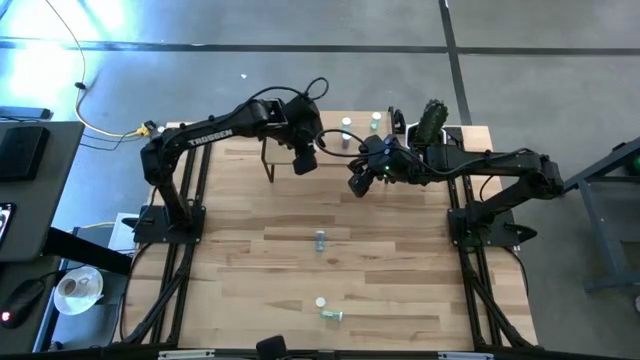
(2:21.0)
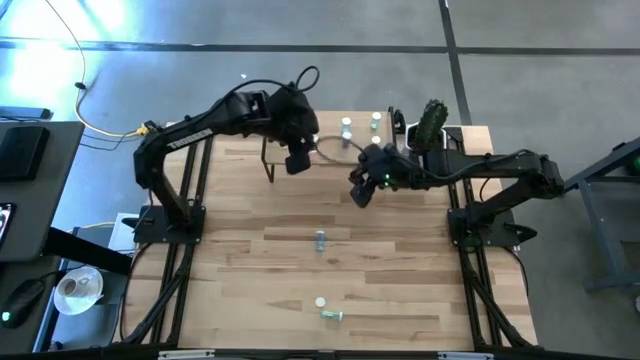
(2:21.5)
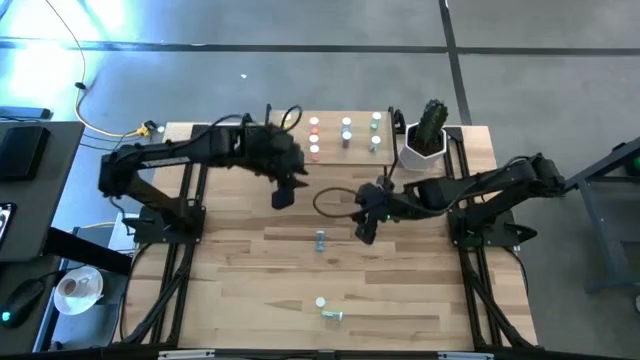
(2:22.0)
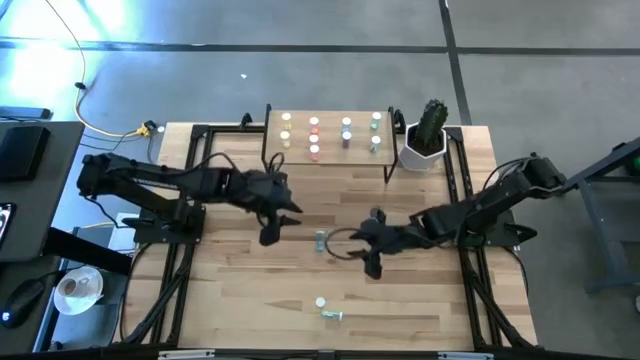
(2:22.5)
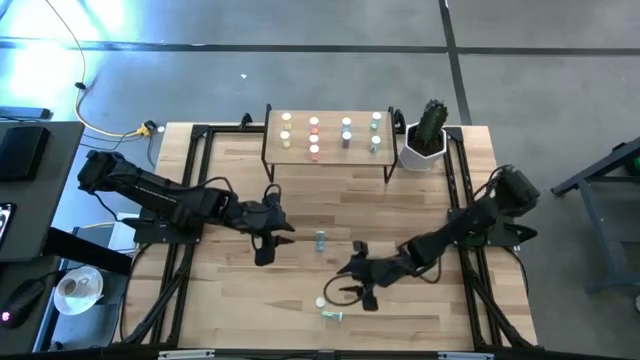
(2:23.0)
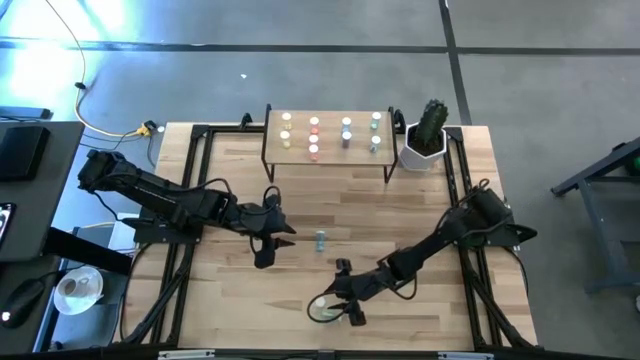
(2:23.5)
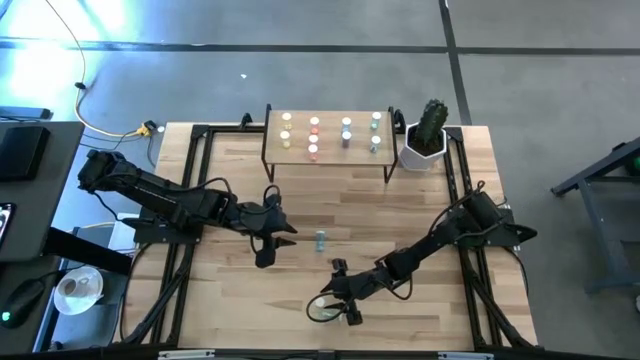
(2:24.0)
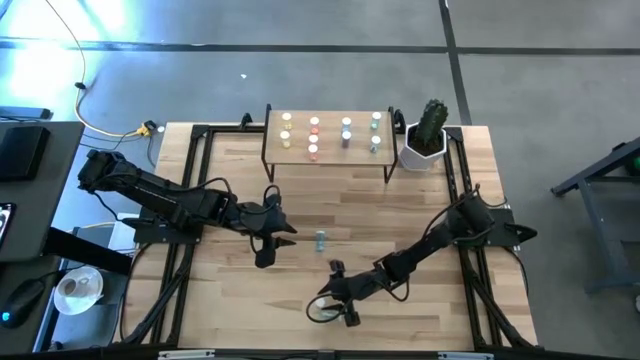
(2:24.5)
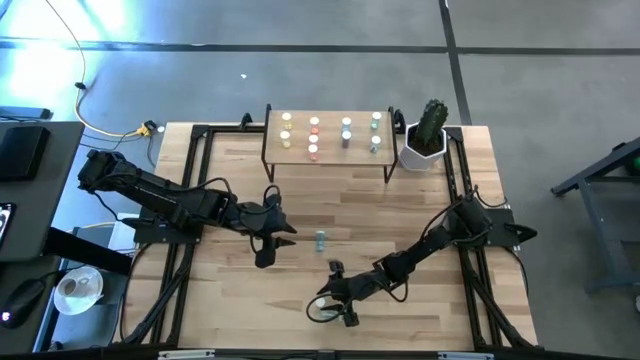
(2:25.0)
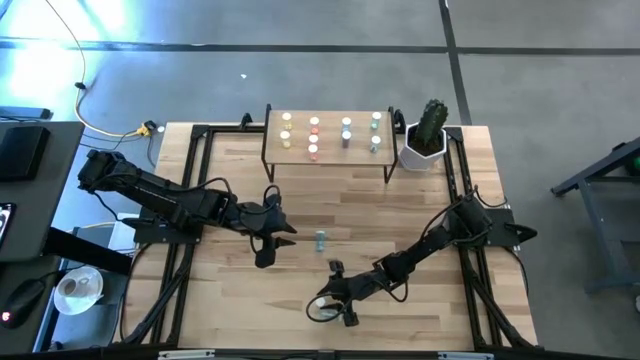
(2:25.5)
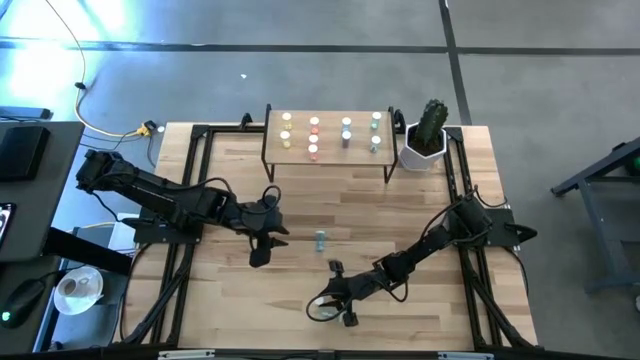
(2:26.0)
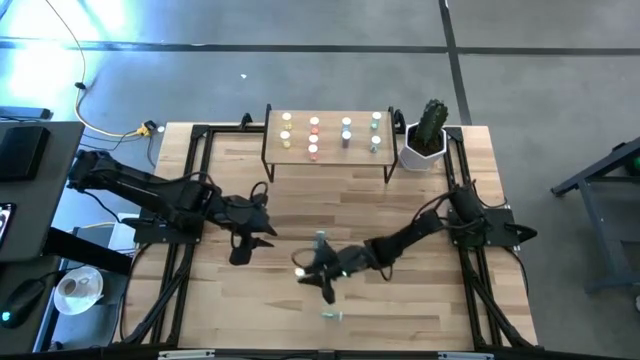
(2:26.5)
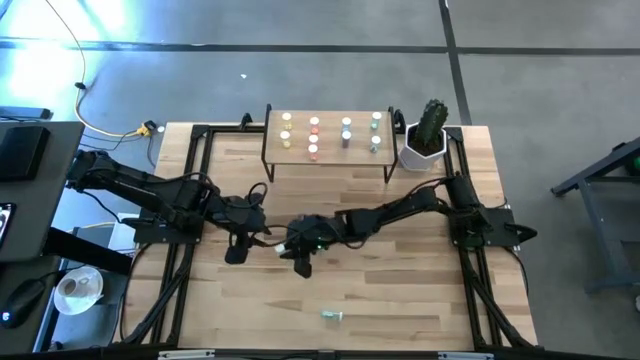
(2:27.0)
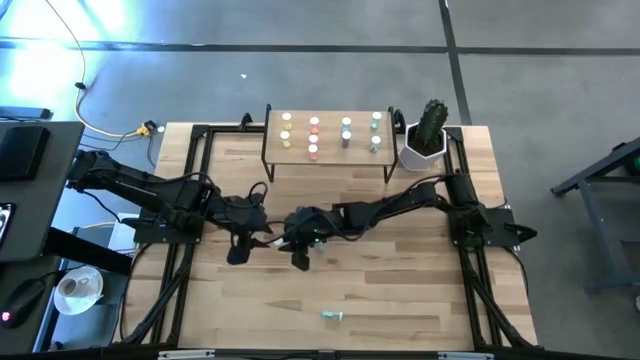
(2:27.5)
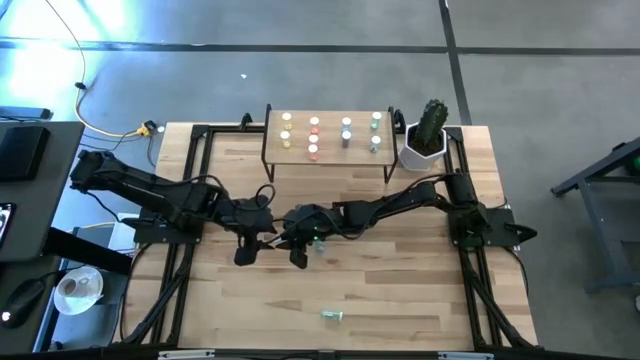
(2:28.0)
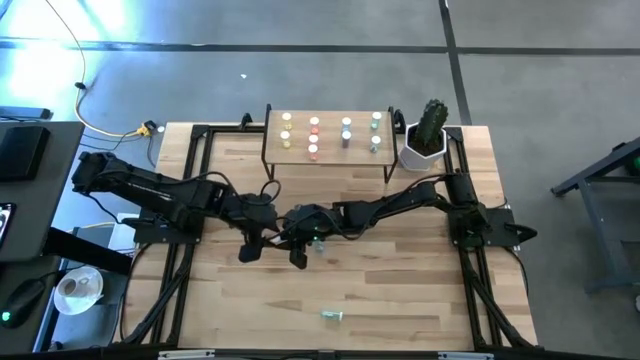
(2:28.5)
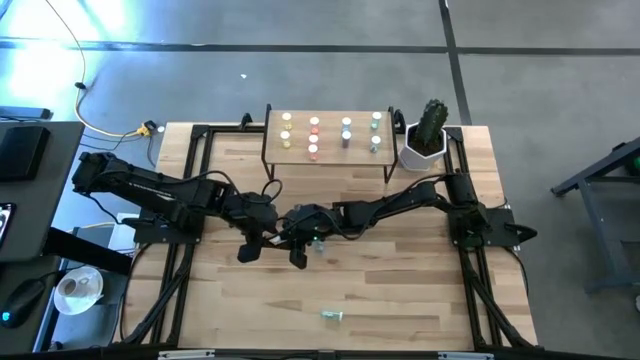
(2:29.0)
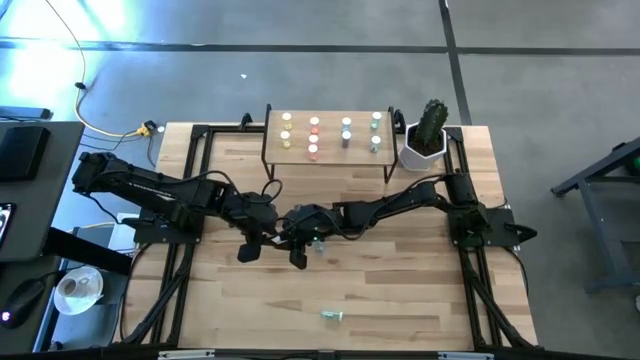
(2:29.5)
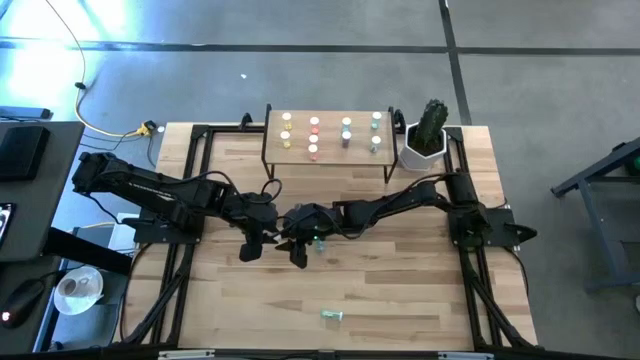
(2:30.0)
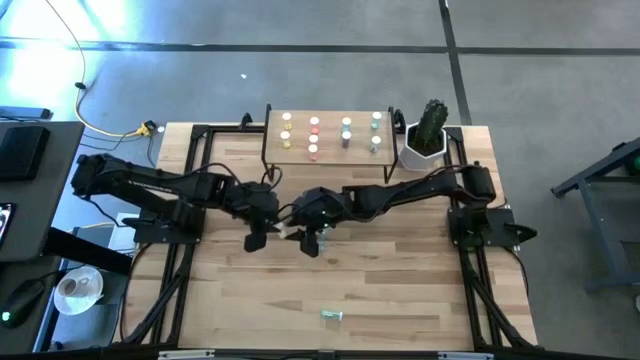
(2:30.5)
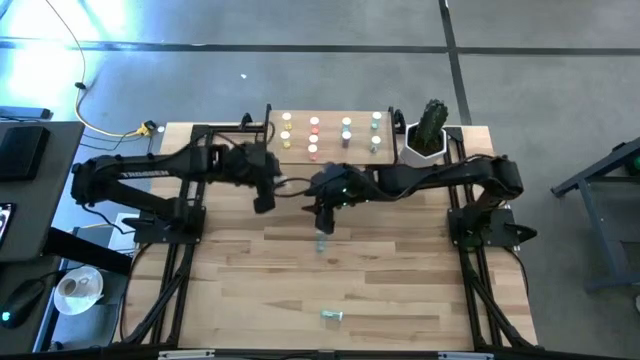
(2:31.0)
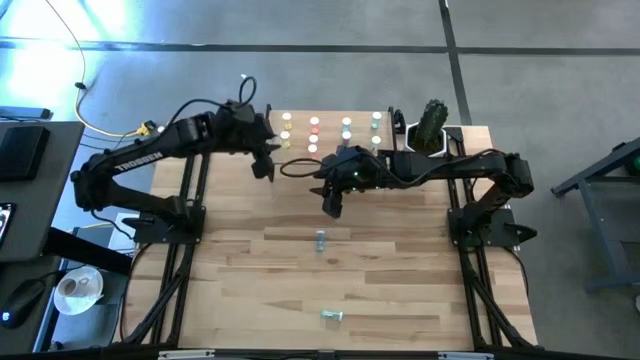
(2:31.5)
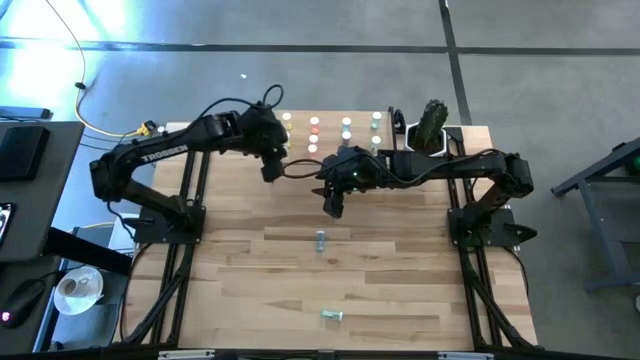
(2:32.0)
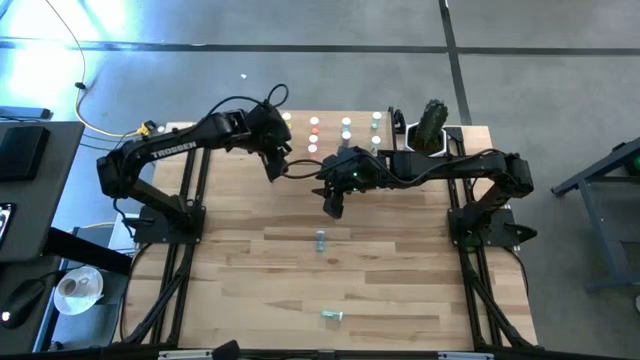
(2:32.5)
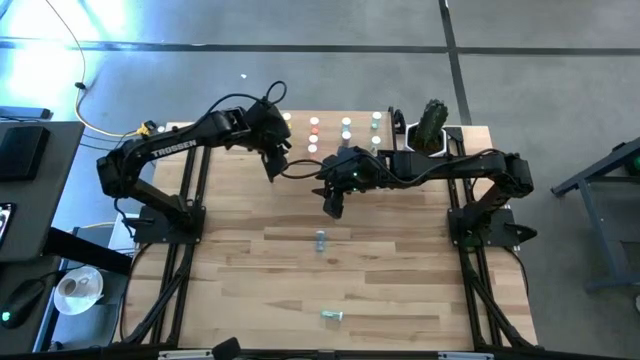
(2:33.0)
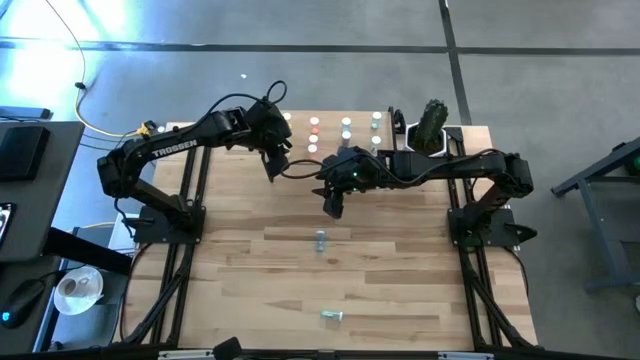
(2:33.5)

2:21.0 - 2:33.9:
Task: Pick and place medicine bottles onto shelf by color
Put the yellow pill bottle on the shelf aligned with the other yellow pill bottles

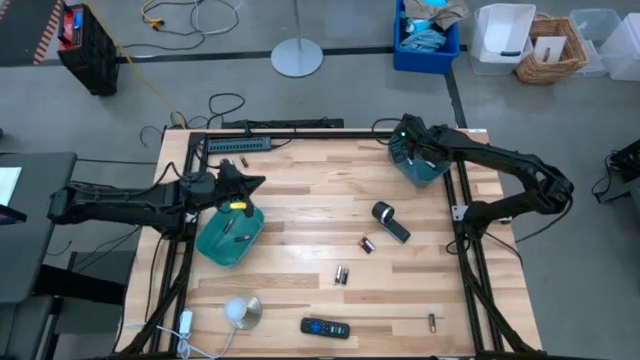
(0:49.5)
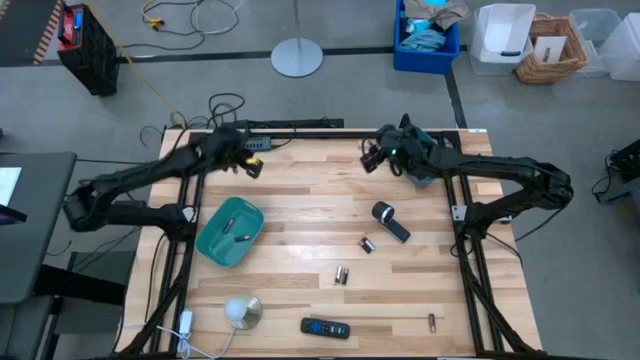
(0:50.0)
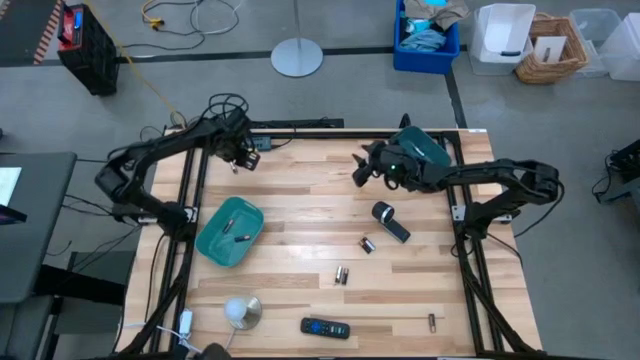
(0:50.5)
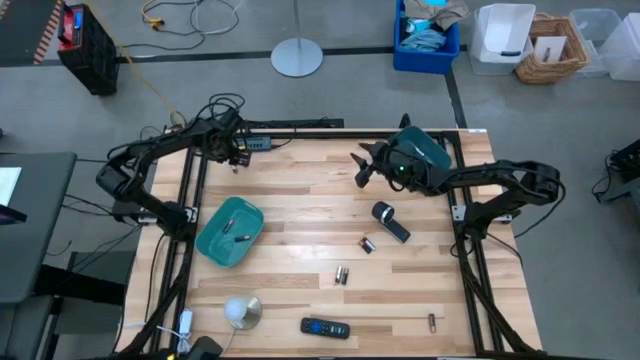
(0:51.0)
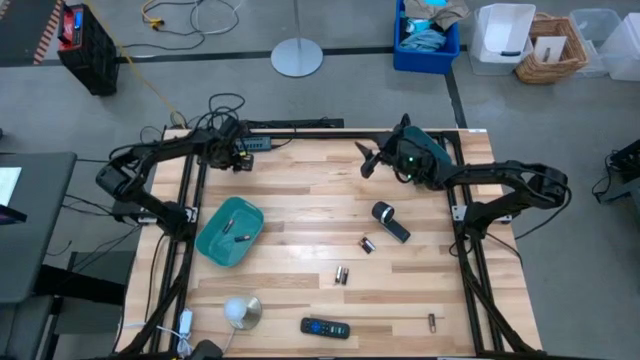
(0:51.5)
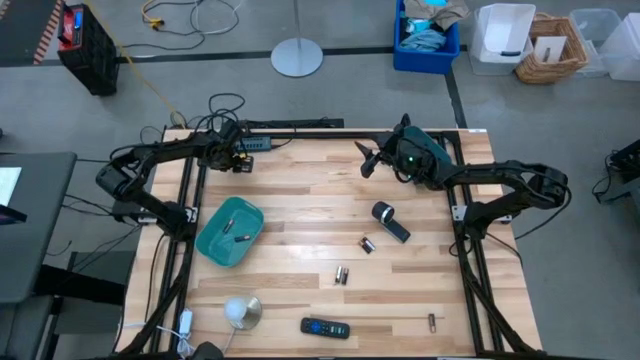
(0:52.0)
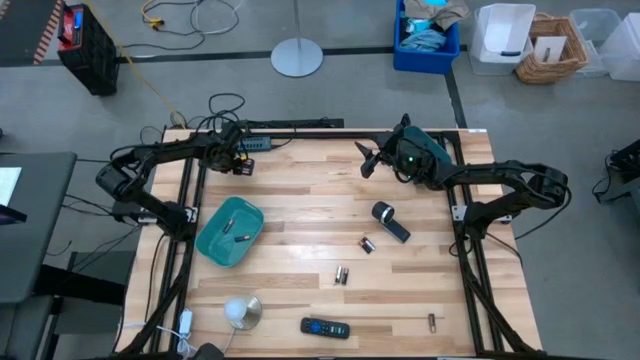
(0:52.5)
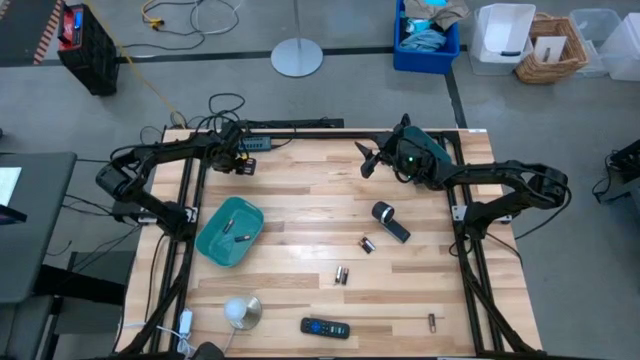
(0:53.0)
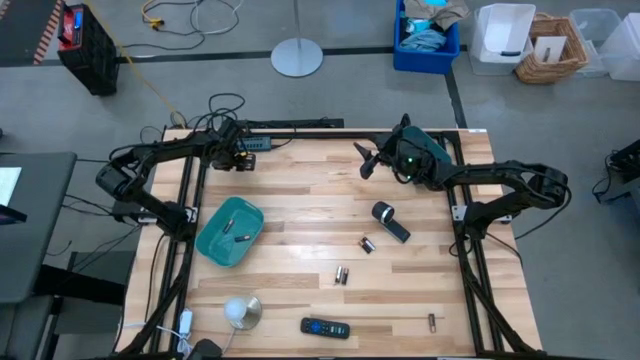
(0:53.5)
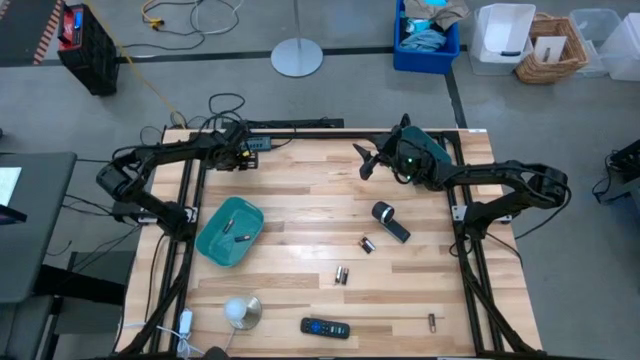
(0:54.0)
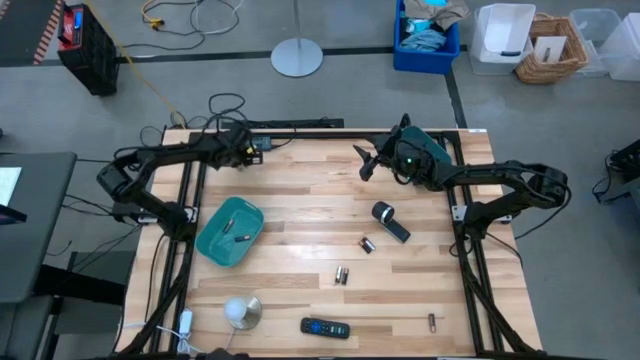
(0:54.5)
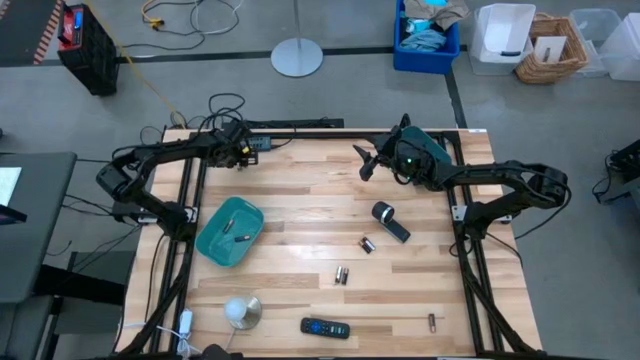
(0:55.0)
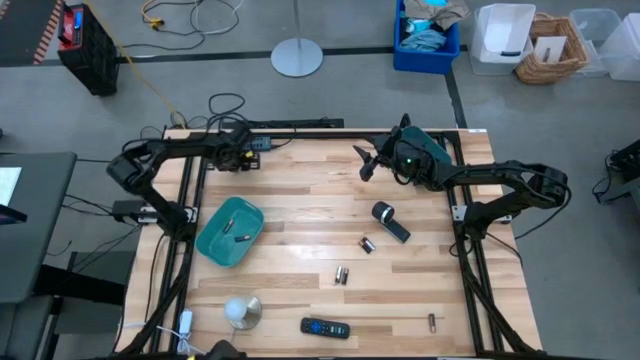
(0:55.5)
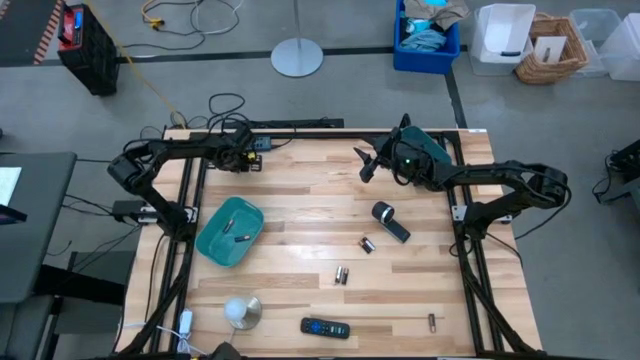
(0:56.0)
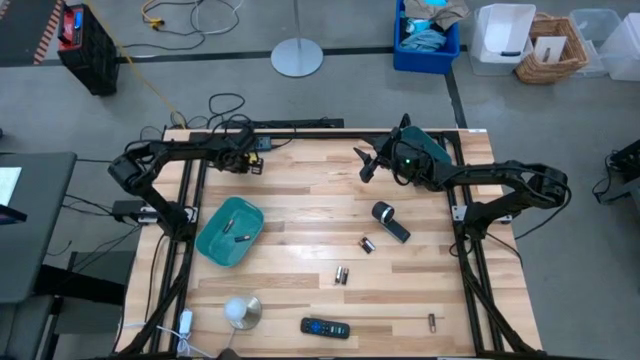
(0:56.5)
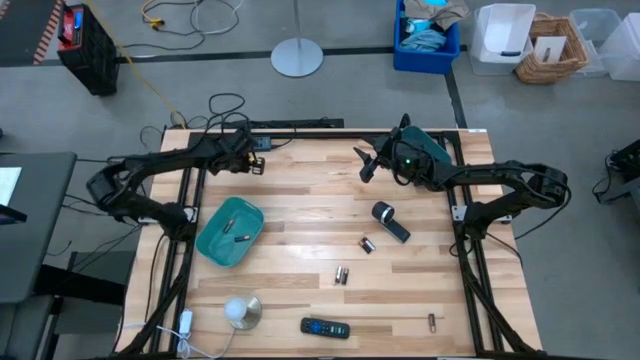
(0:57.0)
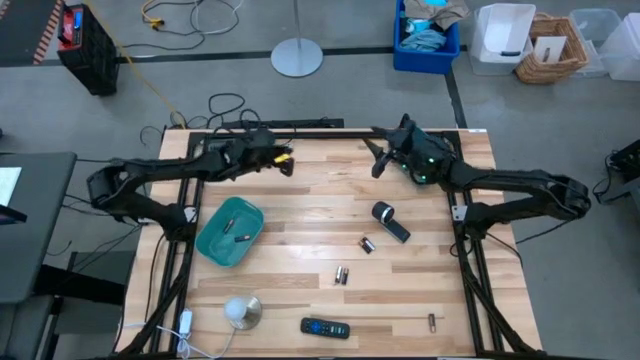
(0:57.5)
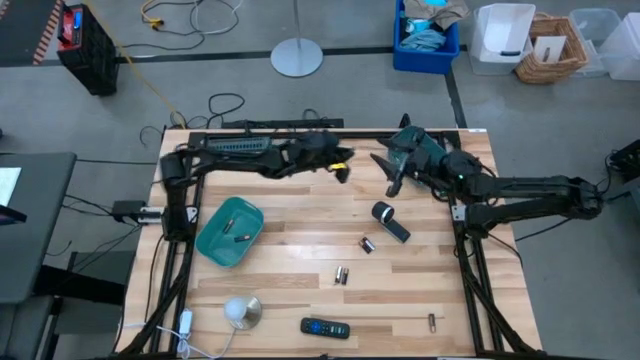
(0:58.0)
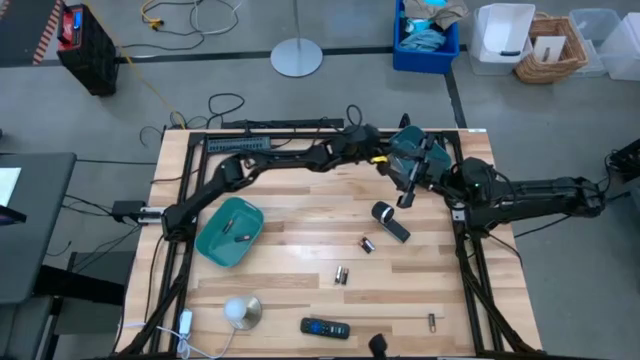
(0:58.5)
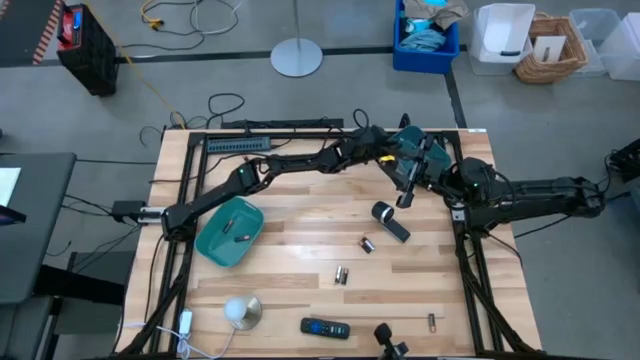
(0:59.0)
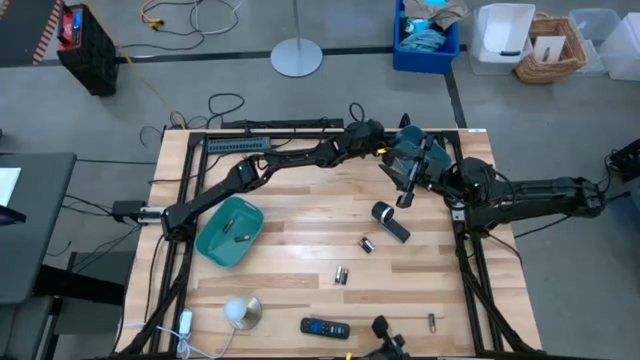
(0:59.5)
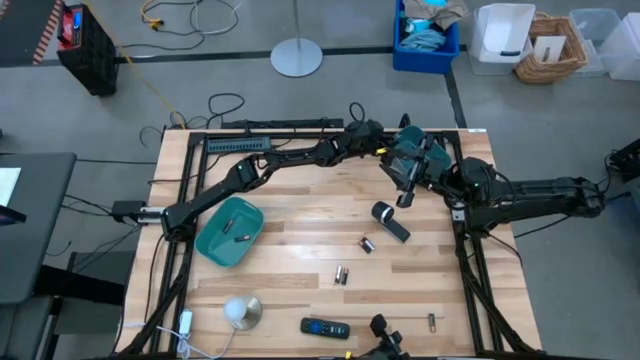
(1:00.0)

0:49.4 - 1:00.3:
Task: Sort batteries
Put the silver battery into the blue bin
